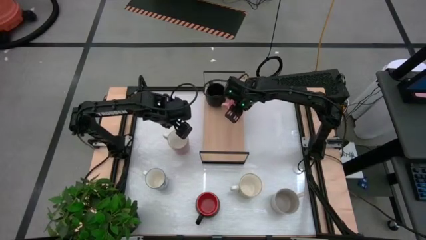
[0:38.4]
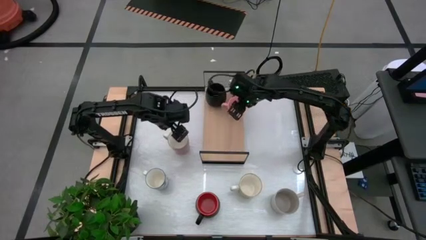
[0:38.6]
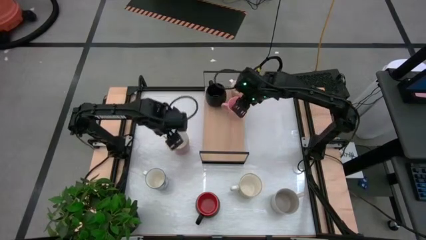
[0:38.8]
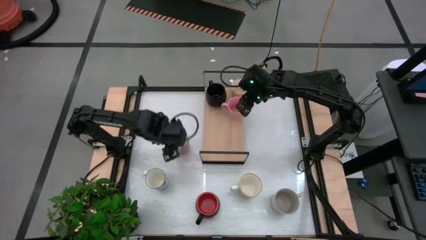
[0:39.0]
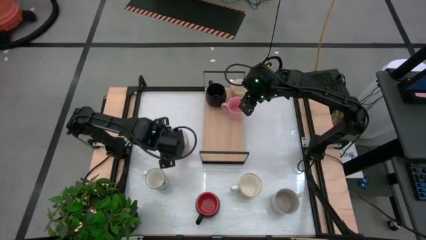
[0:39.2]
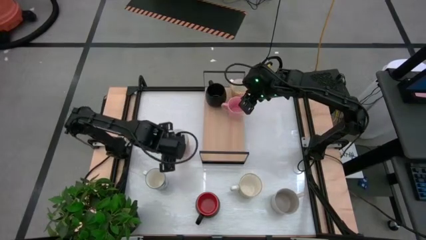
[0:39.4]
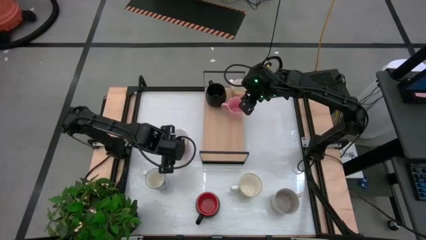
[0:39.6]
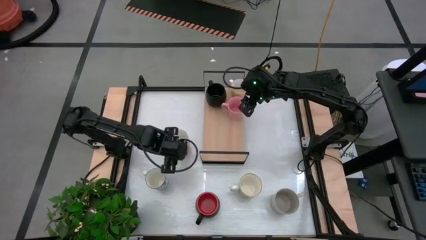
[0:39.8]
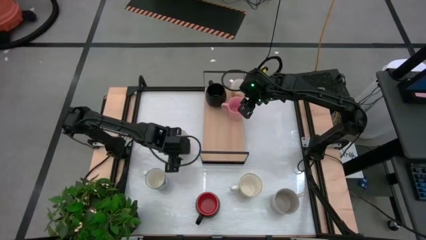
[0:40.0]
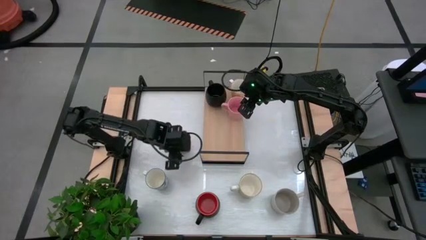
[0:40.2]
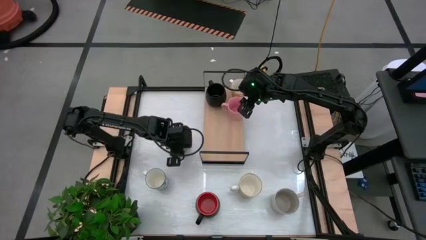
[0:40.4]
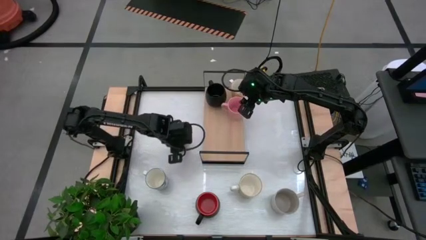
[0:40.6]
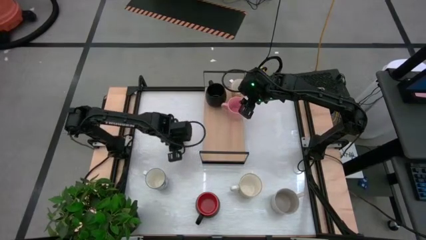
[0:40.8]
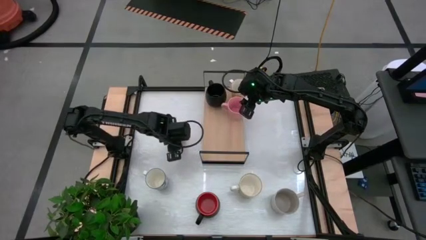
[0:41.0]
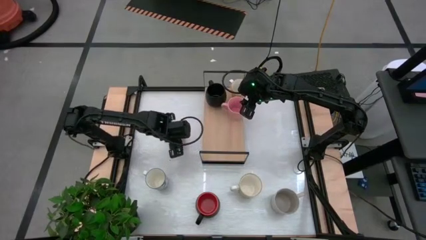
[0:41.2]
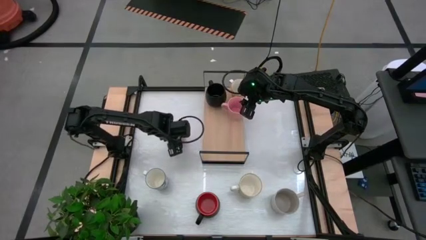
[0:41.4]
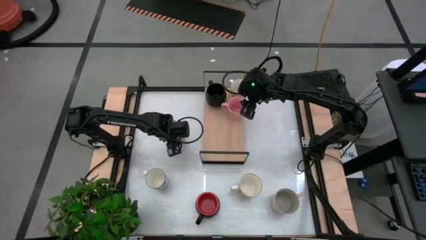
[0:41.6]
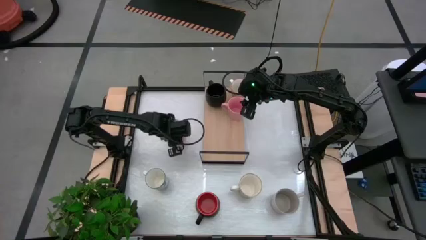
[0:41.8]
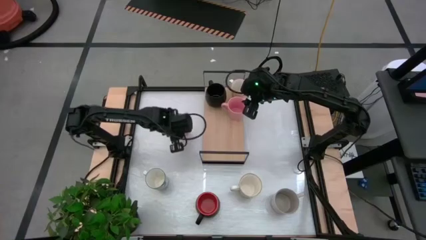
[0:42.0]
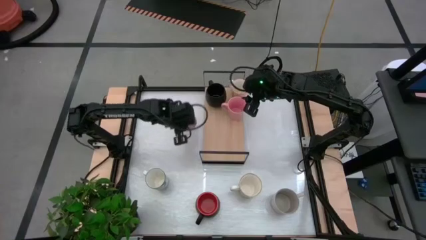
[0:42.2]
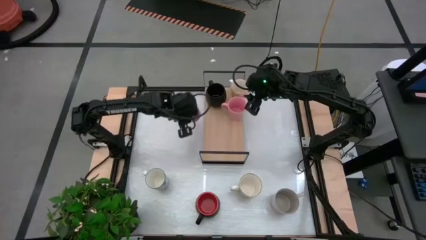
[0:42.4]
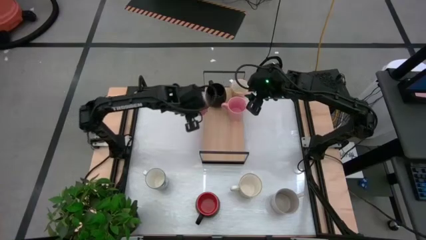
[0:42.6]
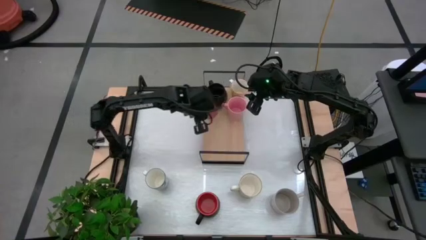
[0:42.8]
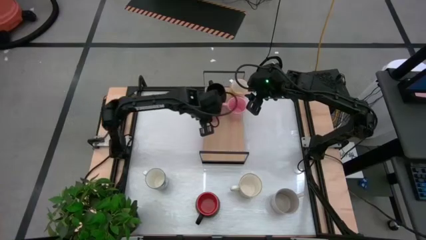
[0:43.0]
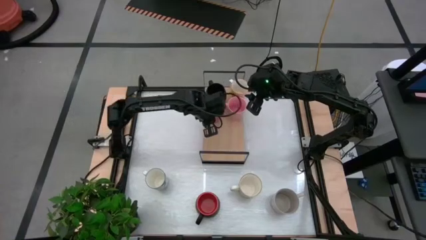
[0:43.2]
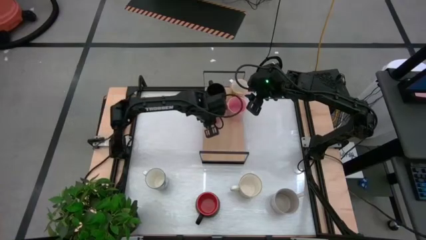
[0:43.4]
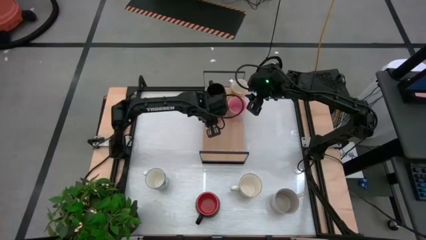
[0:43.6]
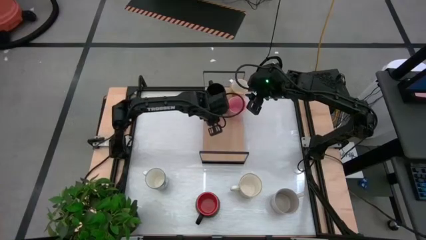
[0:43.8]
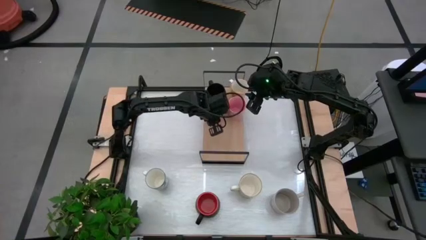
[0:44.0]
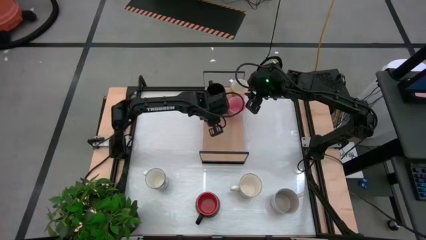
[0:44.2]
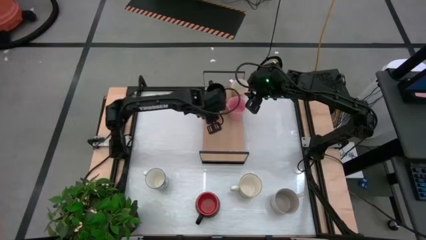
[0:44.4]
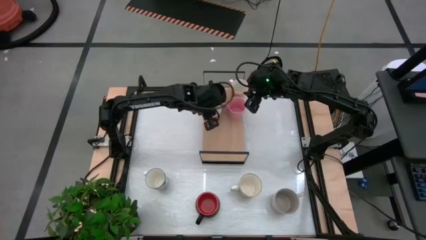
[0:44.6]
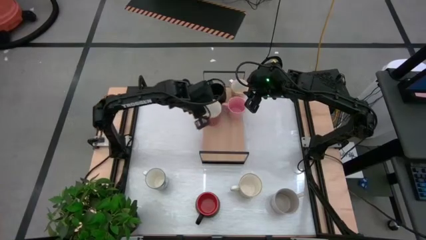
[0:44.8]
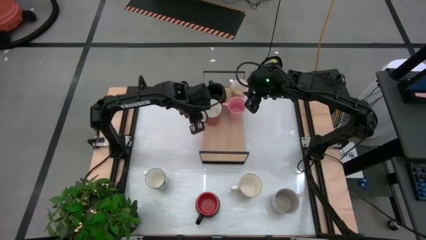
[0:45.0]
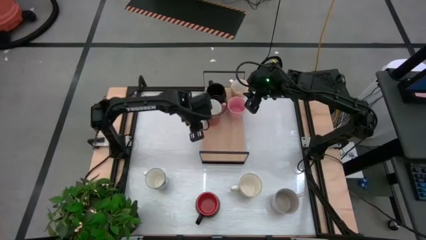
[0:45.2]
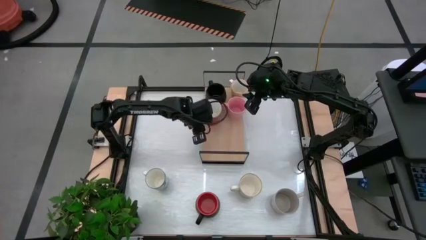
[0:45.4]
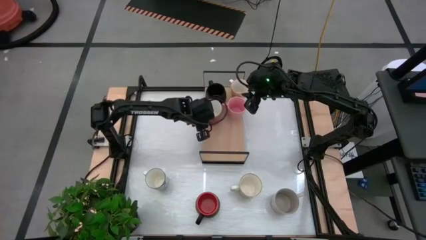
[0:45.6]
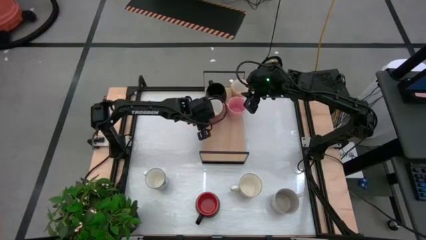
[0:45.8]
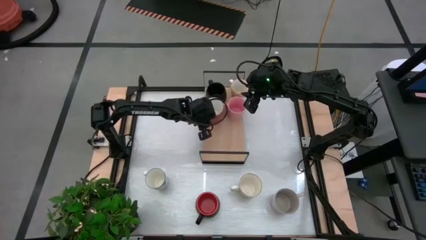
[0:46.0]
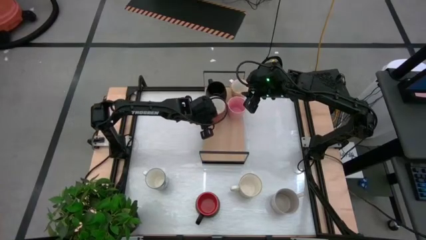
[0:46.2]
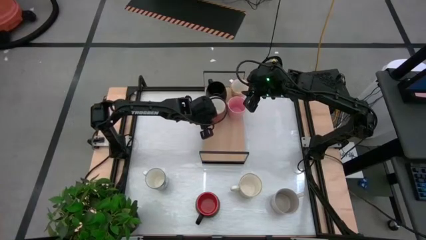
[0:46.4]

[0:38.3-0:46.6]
Task: Place coffee mugs
Put the red mug on the shelf

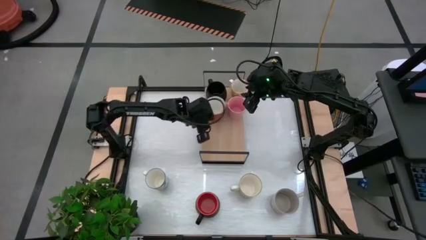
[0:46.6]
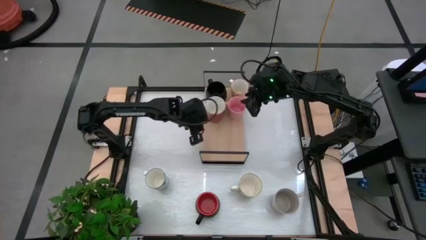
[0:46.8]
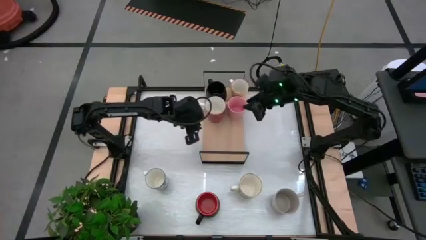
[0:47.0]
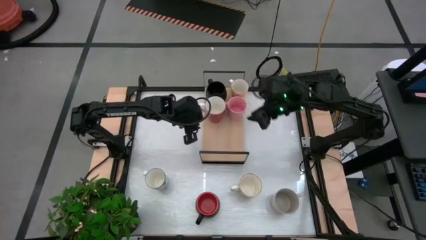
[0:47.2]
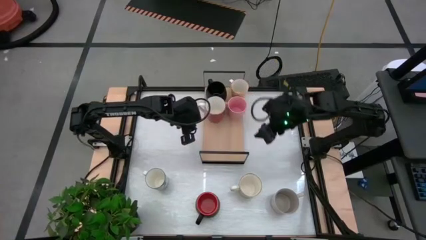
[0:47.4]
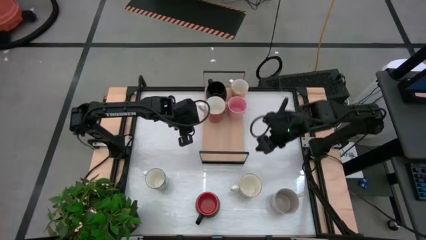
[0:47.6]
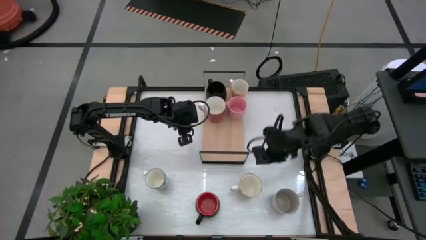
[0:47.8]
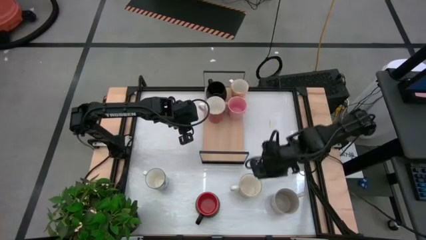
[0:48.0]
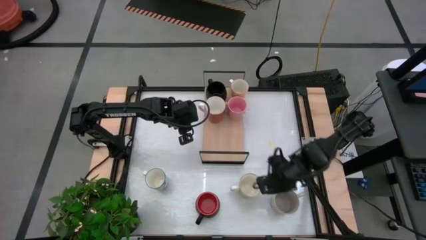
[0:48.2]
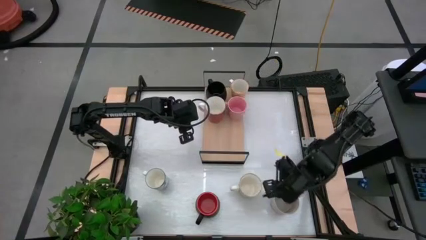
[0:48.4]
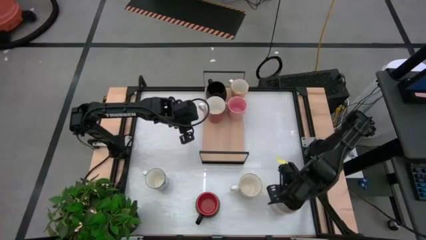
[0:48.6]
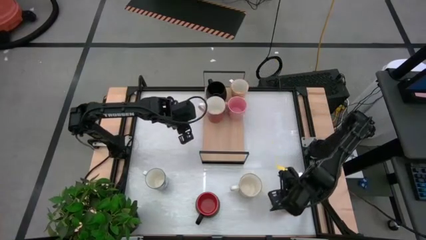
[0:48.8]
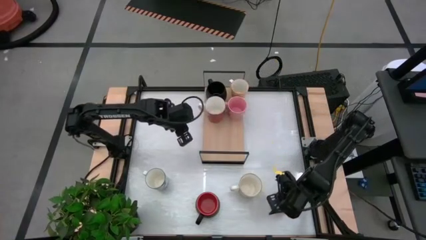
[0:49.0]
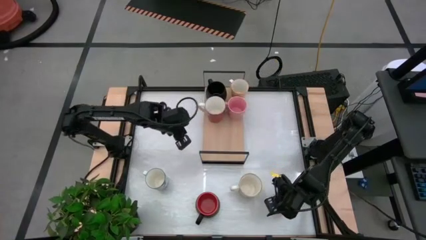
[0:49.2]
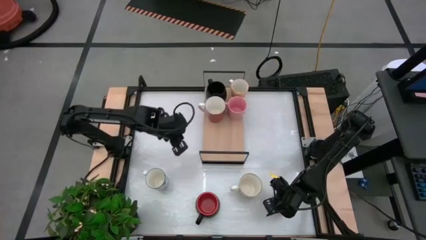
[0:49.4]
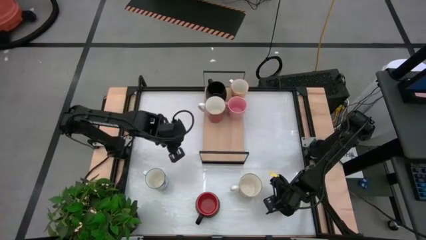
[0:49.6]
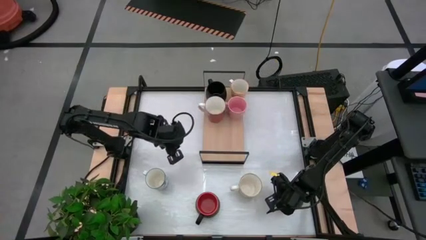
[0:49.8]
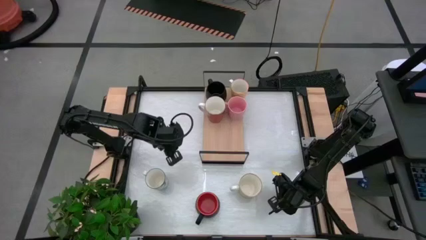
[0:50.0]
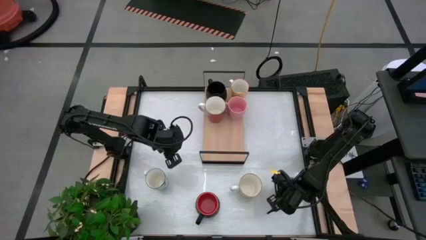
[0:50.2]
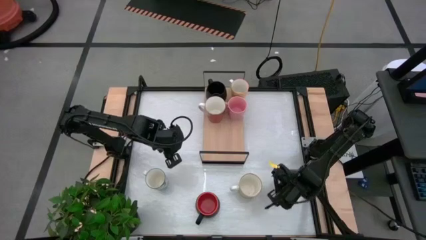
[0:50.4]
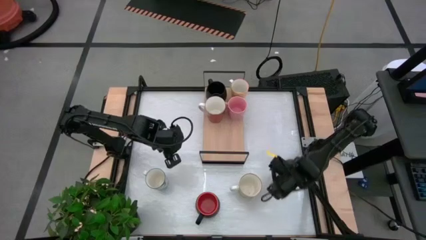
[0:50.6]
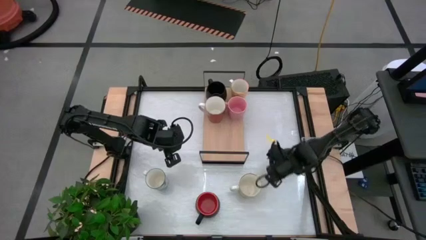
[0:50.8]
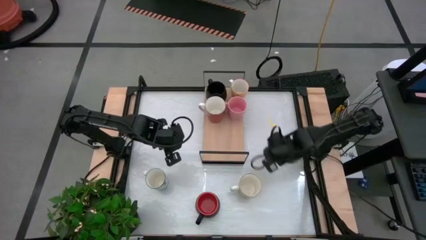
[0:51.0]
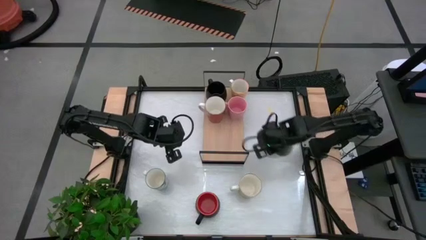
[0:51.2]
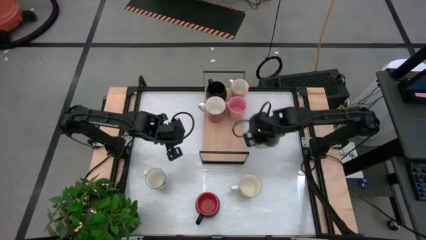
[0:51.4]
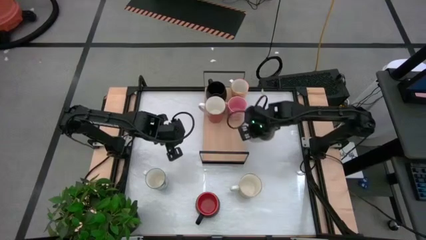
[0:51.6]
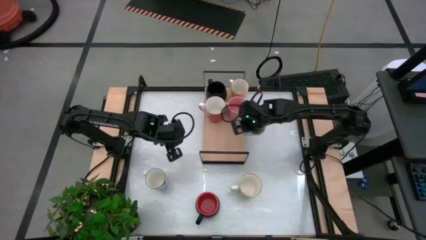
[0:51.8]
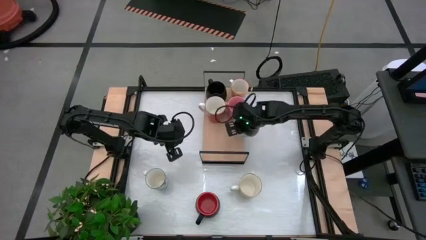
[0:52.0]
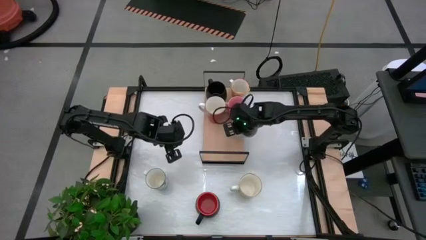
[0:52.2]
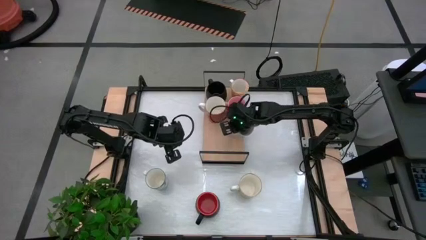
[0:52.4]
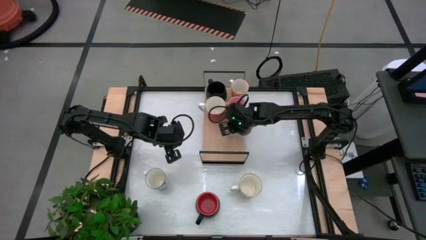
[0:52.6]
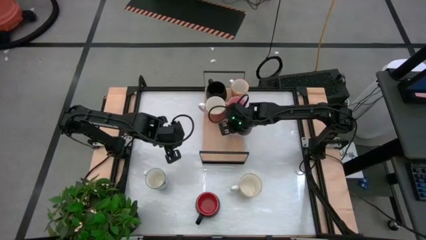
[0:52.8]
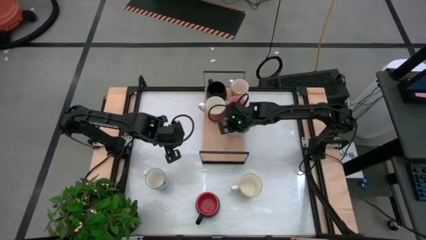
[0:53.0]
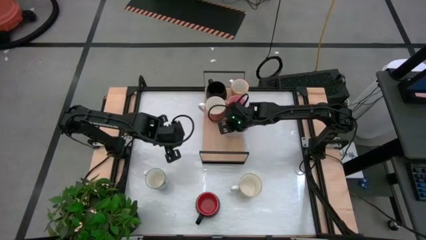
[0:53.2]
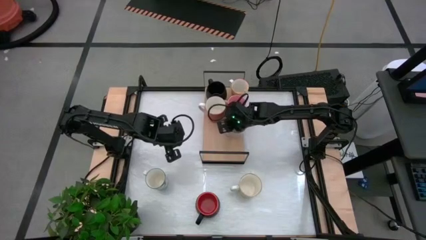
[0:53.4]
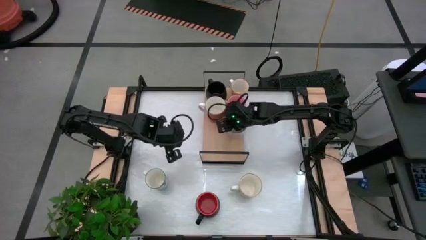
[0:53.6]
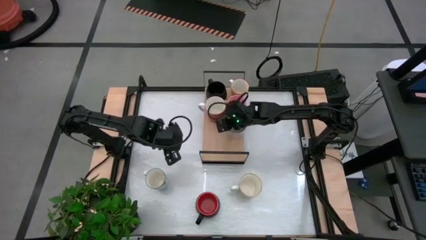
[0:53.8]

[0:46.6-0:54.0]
Put the gray pattern mug on the shelf

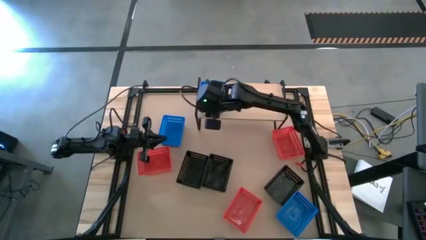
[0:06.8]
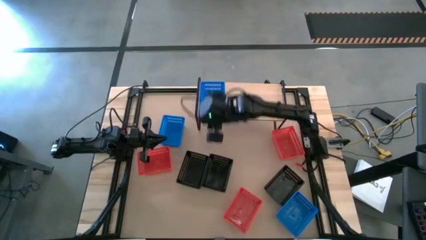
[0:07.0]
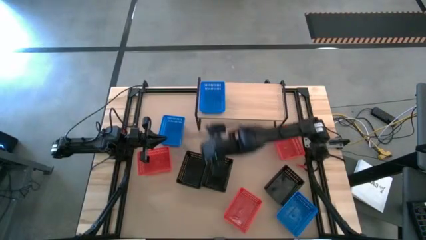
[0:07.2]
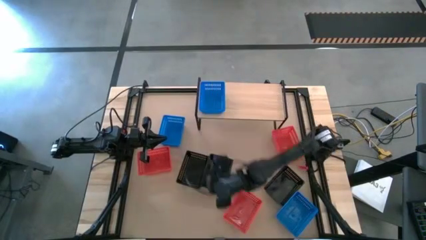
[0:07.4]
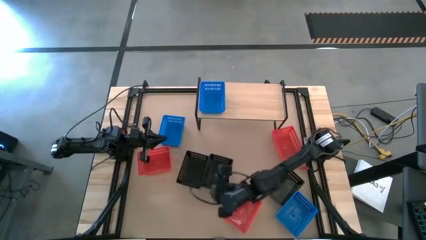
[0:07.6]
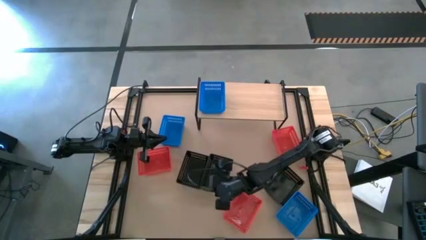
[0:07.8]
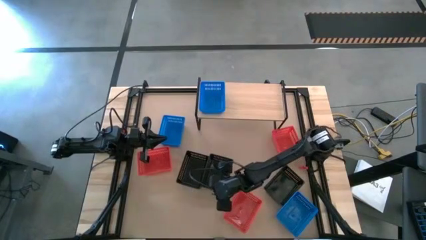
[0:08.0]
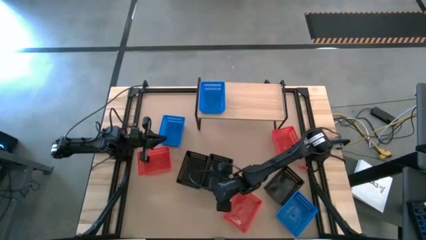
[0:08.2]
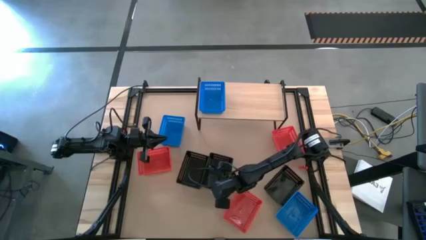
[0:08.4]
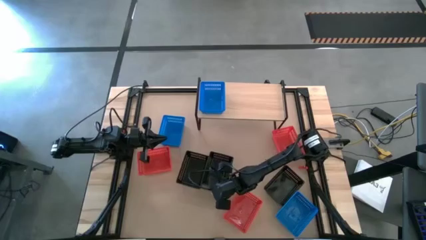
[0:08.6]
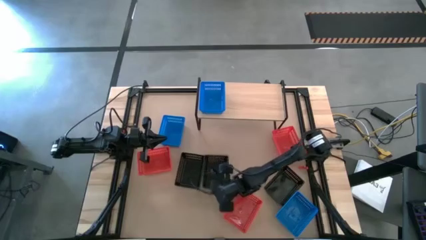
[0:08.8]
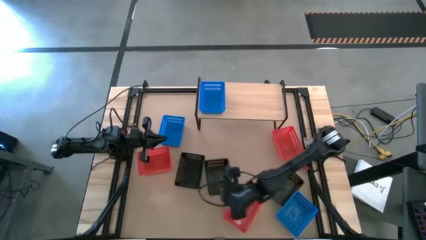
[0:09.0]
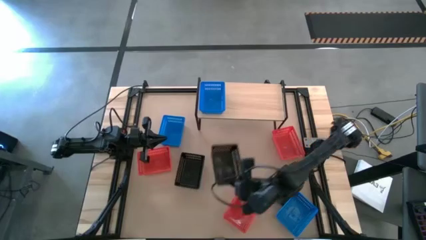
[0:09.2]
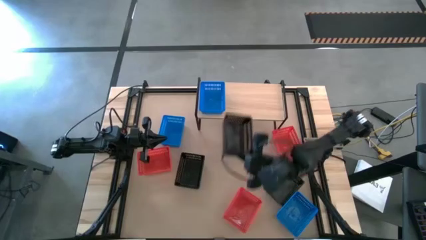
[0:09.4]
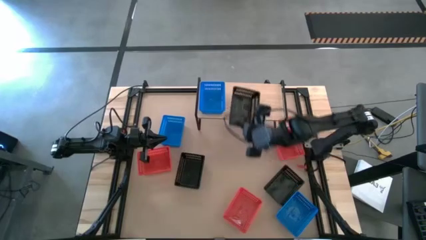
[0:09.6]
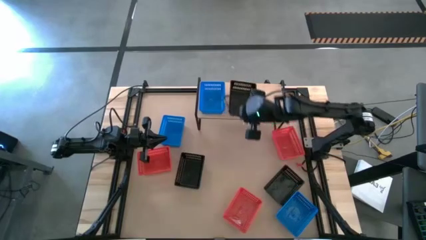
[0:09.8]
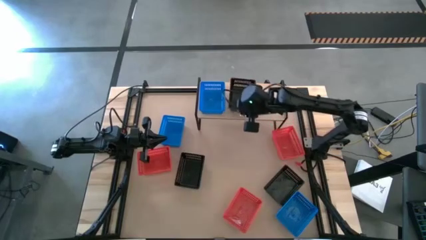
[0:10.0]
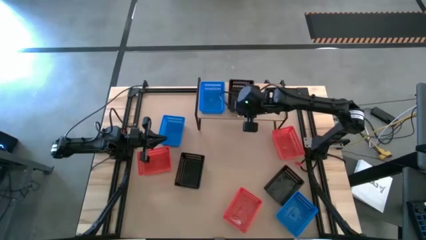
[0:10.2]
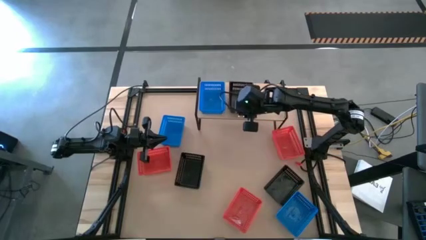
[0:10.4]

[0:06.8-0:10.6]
Task: Stack baskets on shelf by color
Put the middle black basket on the shelf
